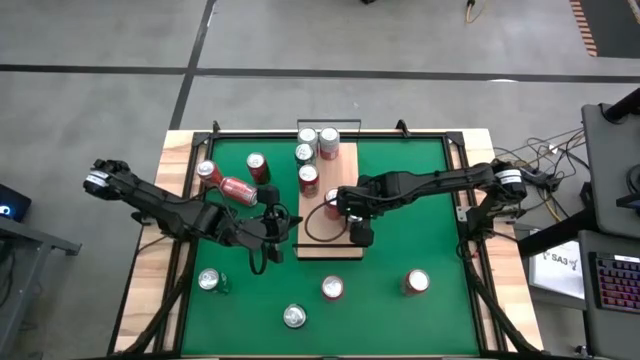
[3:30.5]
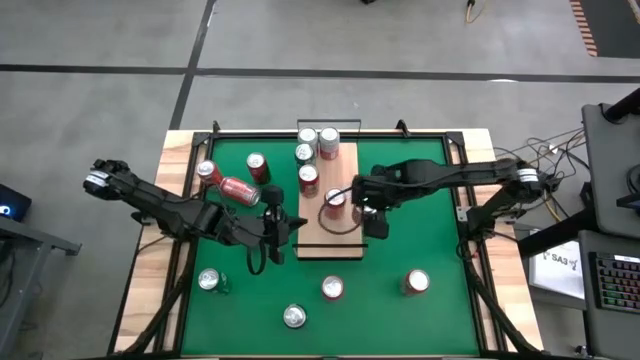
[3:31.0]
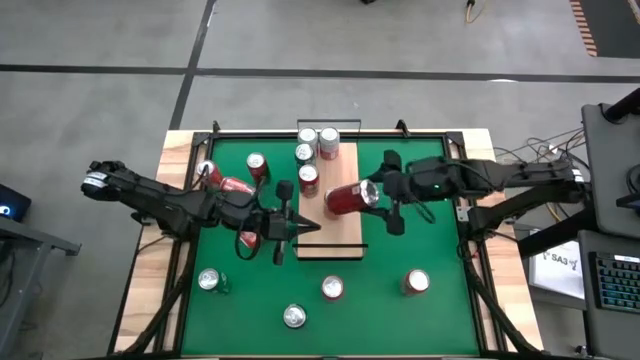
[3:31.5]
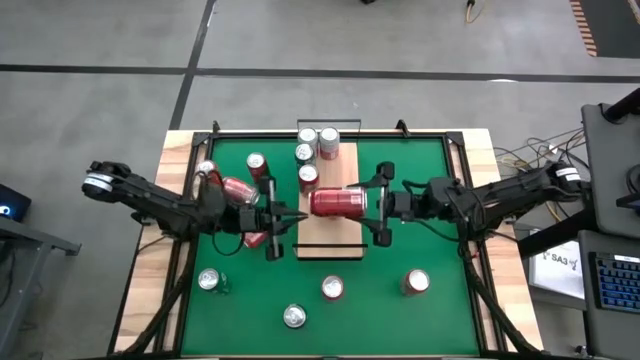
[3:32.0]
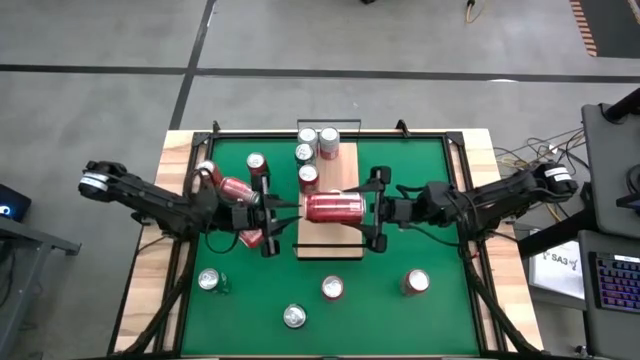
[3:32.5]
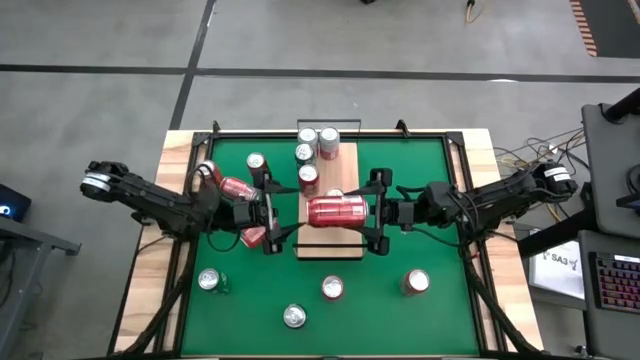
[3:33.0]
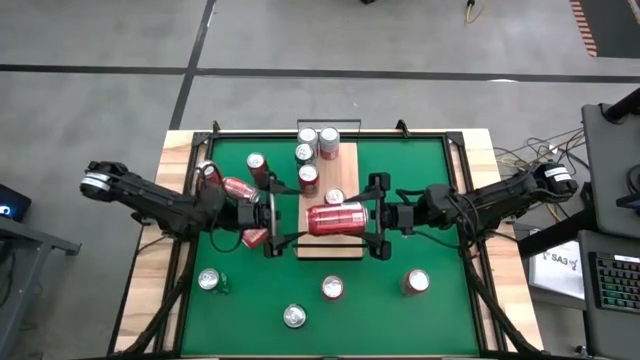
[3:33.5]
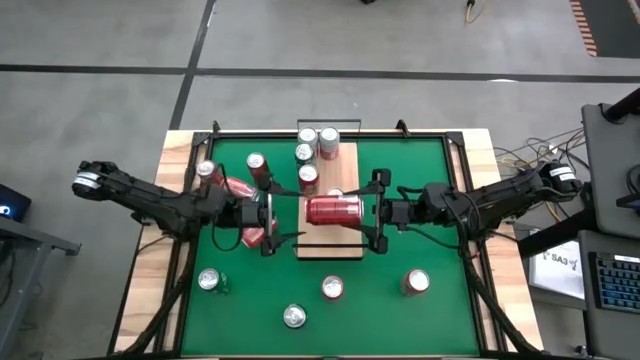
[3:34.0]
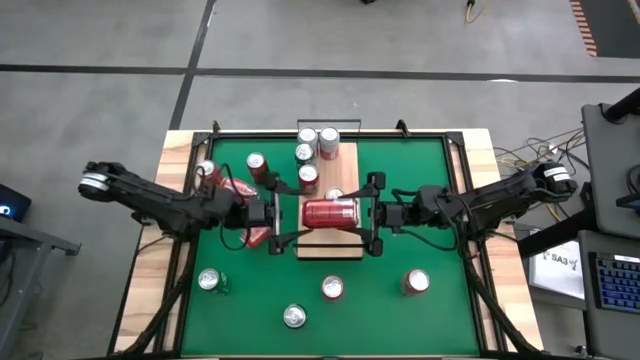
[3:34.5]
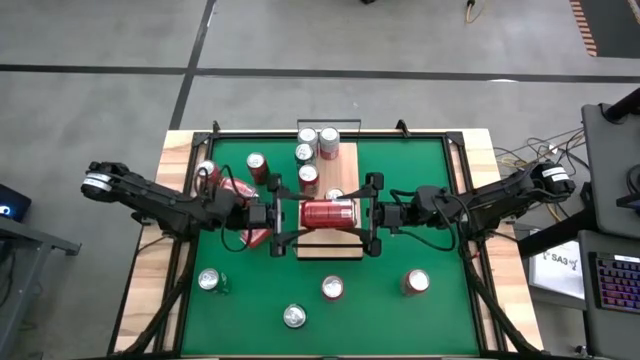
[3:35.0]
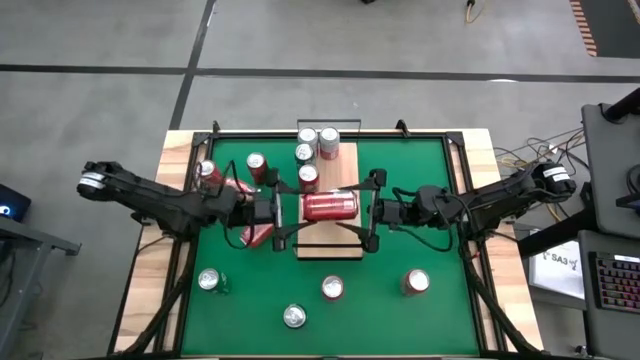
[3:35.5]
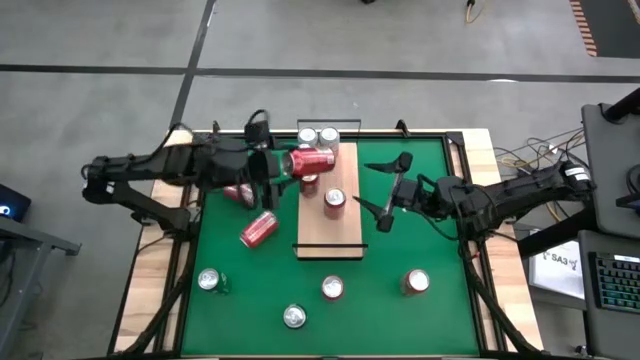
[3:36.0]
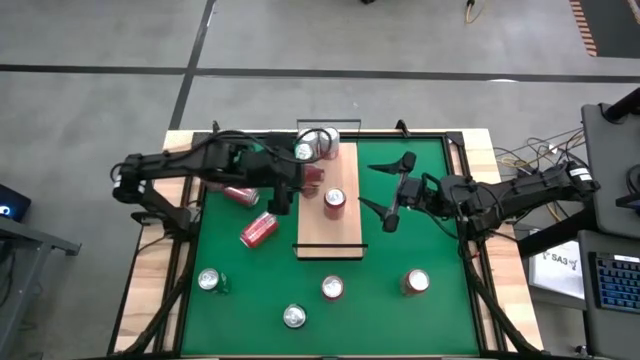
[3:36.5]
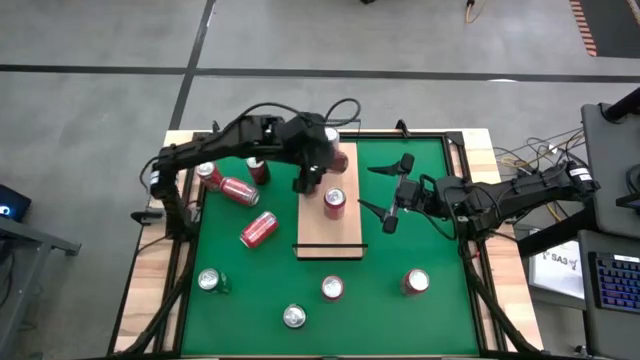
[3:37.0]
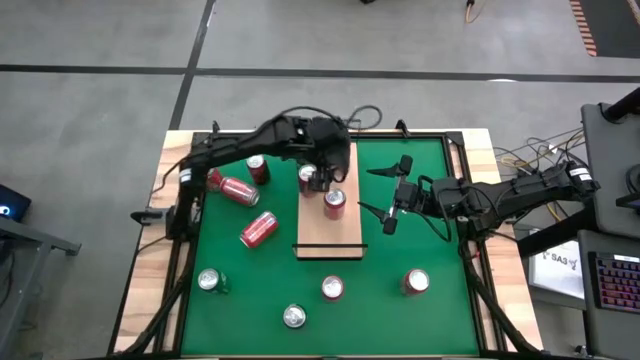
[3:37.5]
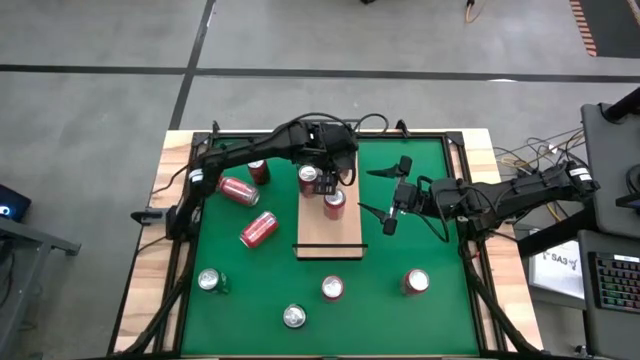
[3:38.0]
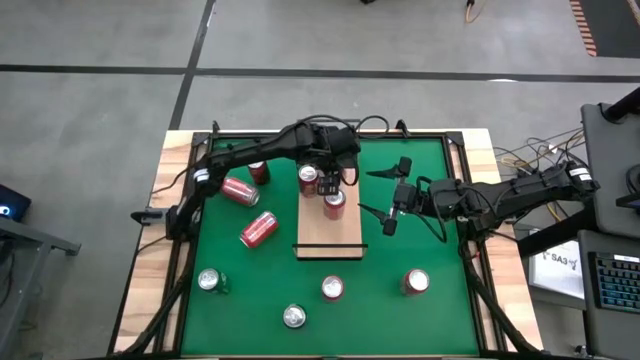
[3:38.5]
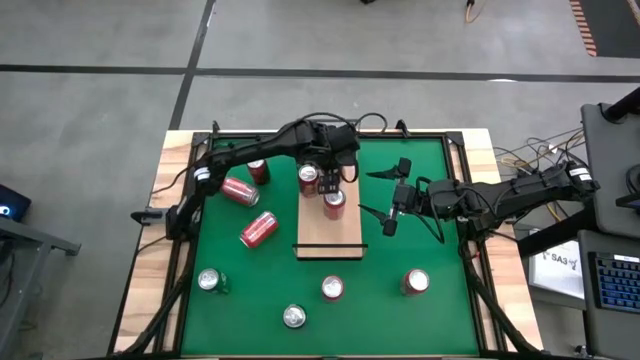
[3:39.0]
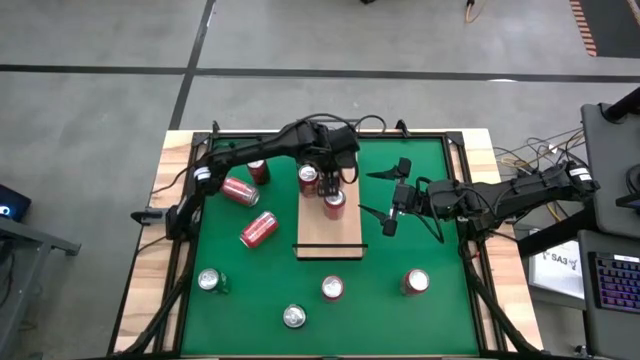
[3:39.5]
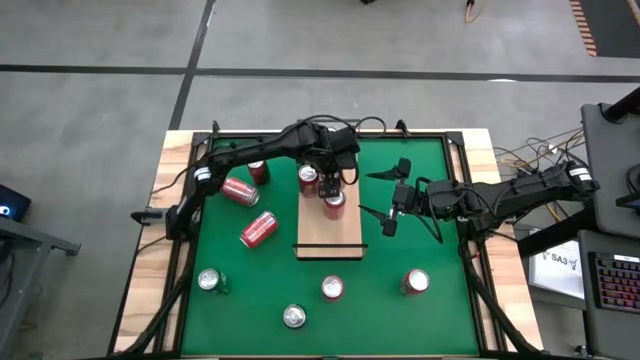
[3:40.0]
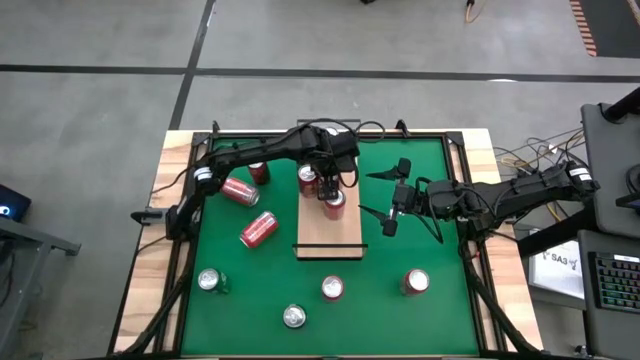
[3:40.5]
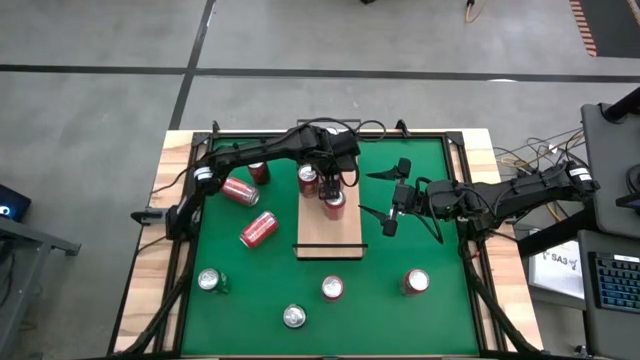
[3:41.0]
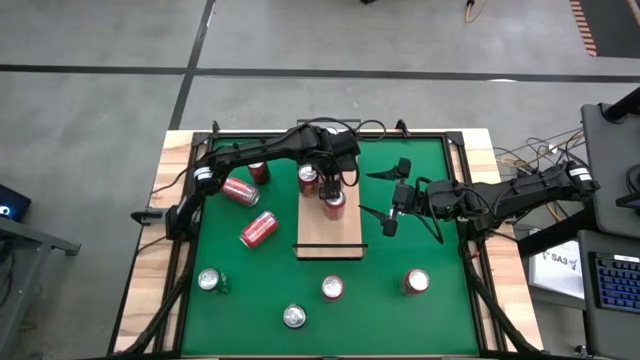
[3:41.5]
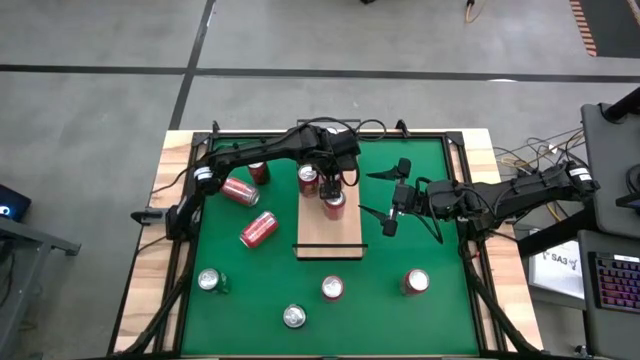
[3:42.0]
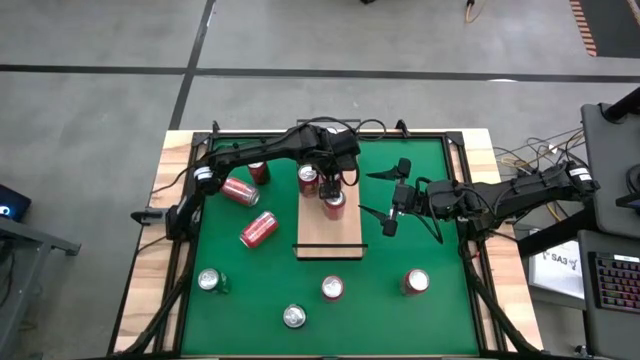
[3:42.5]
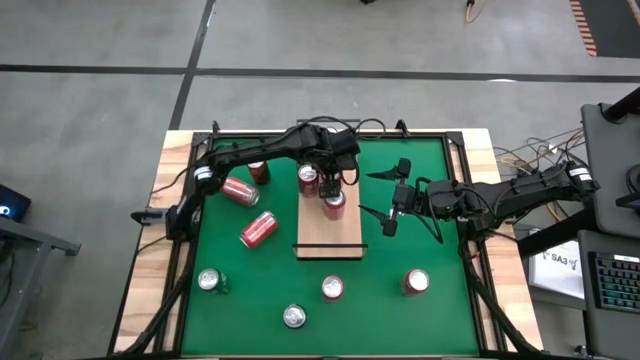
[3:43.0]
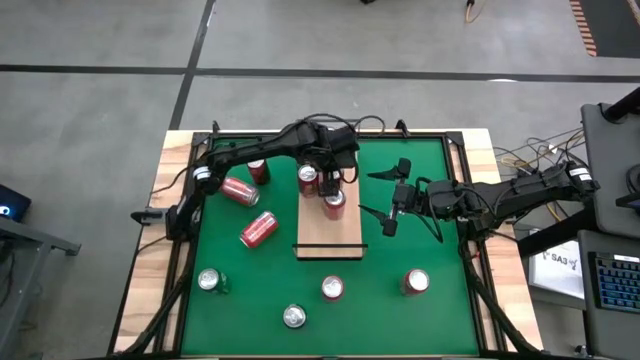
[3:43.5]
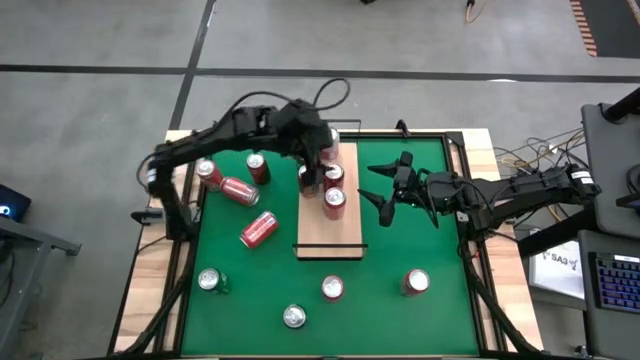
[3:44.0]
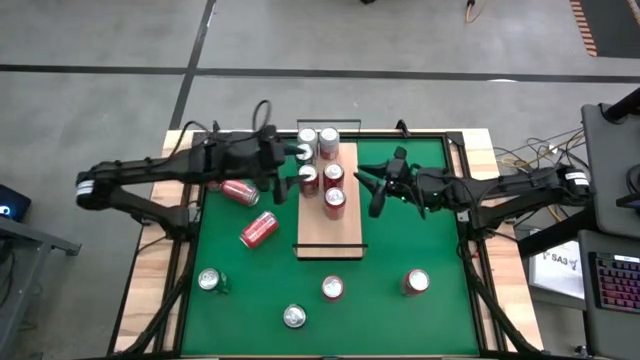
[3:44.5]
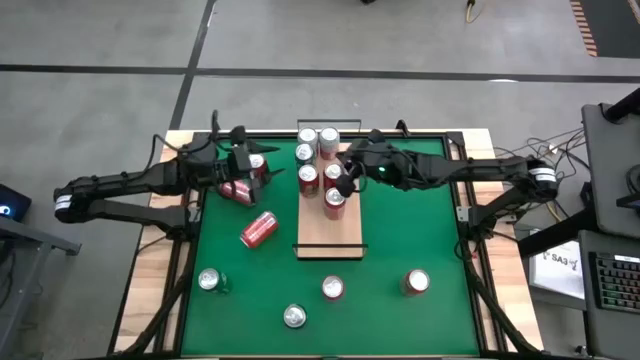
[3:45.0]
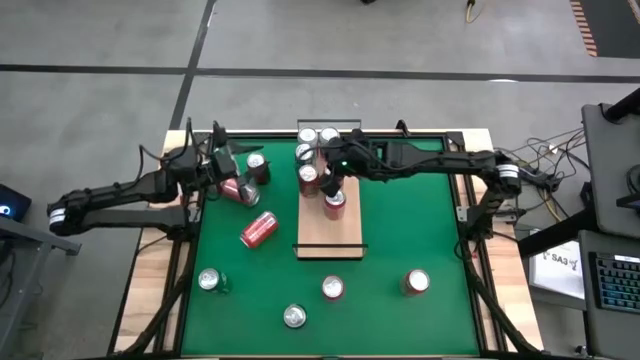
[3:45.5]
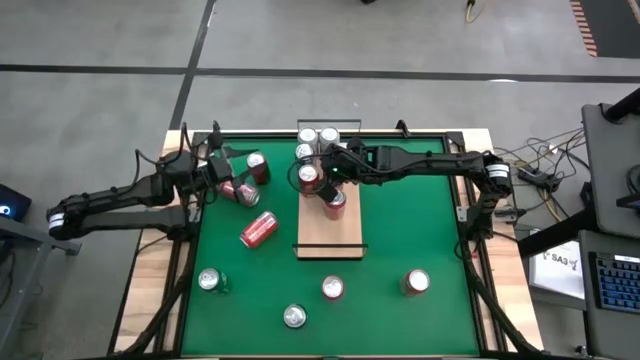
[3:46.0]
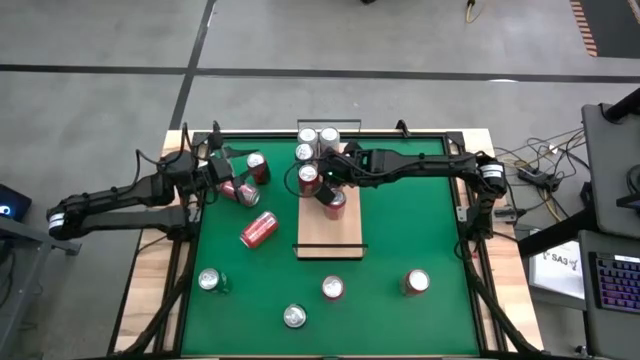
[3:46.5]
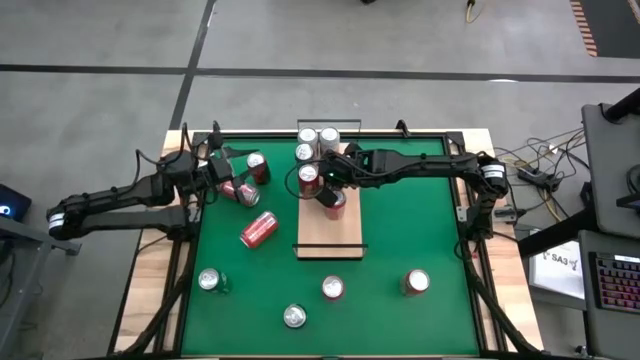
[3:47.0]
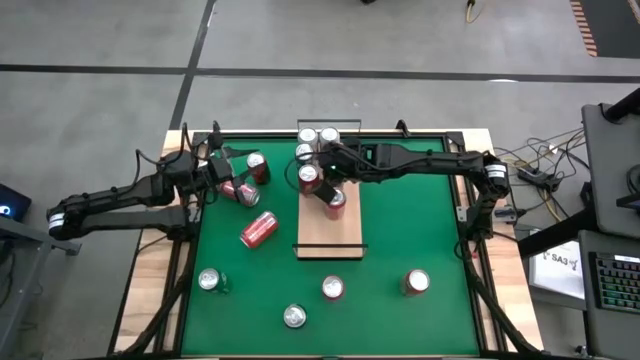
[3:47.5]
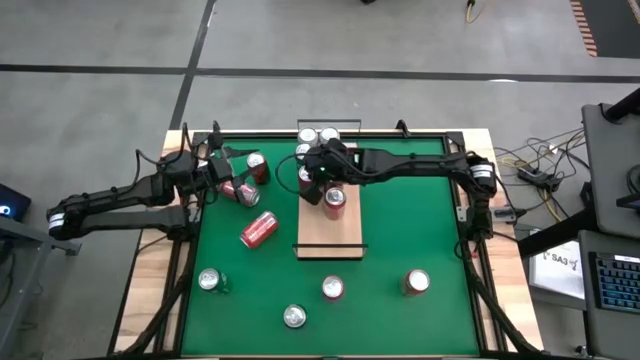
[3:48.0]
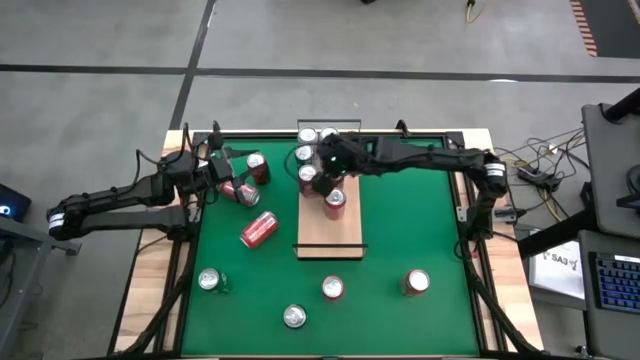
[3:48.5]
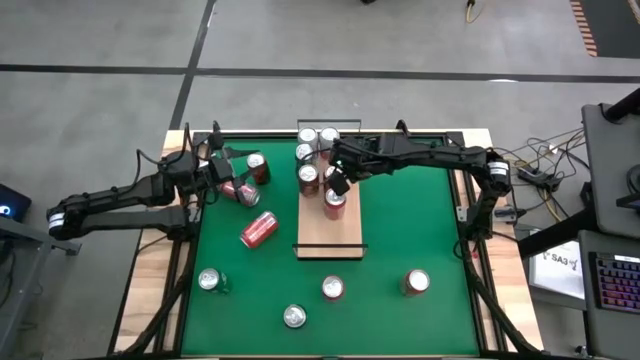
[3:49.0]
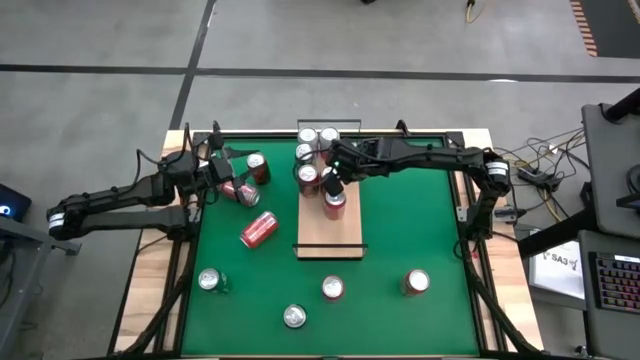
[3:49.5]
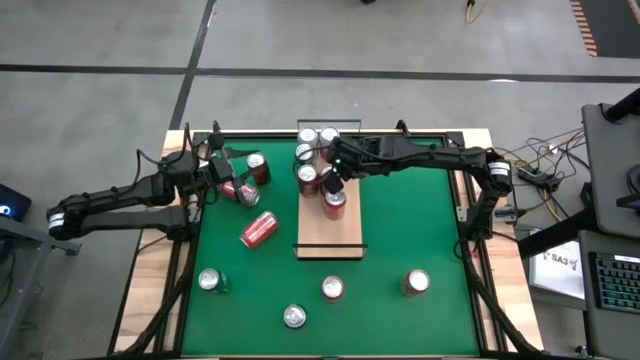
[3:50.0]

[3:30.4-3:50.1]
Task: Place canned beverage on shelf
Put the red soda can on the shelf and aligned with the other red soda can

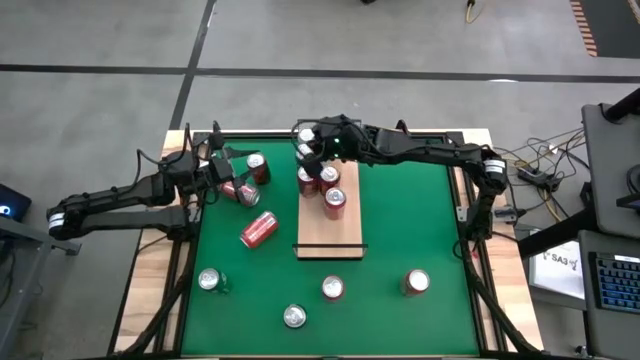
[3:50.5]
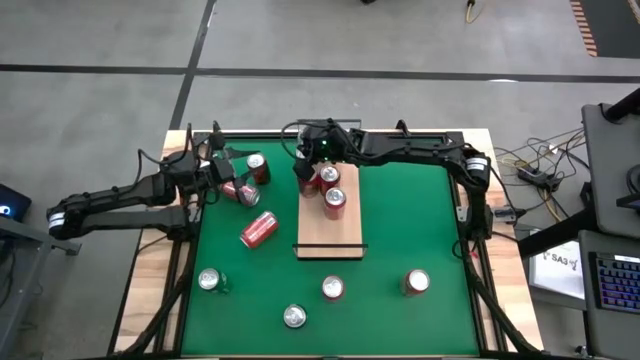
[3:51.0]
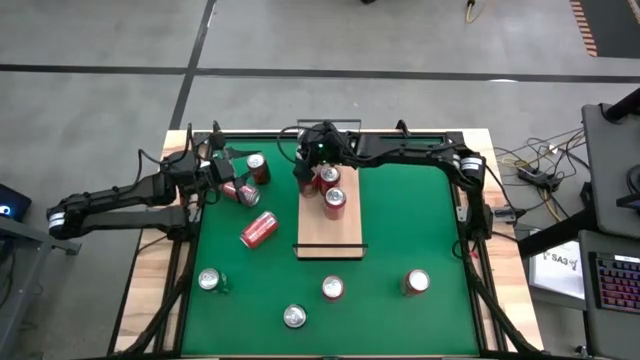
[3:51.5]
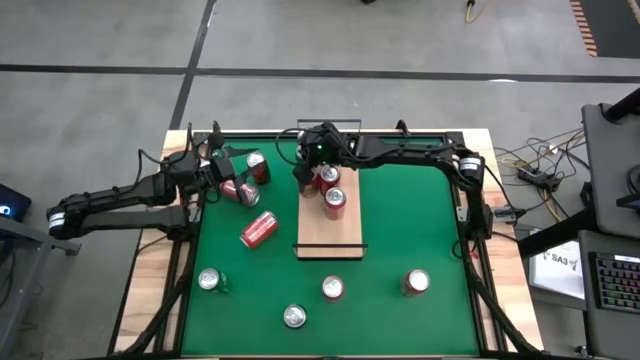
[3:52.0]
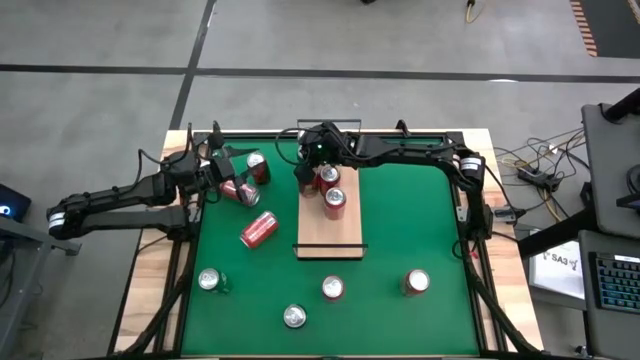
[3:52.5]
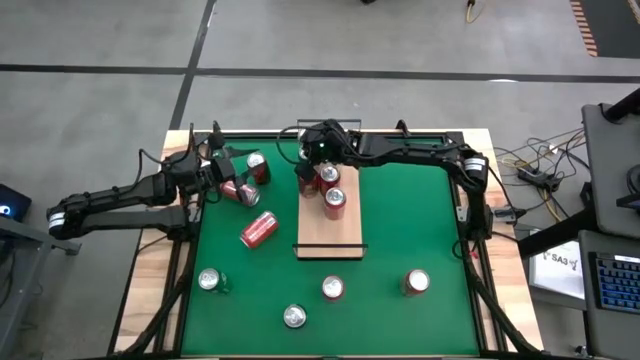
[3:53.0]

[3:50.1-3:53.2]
Adjust the green soda can
